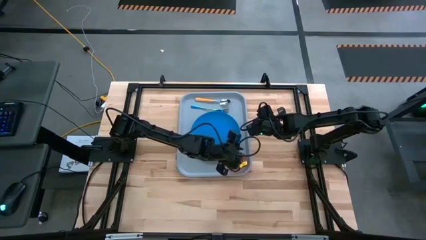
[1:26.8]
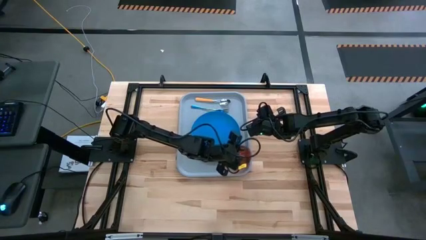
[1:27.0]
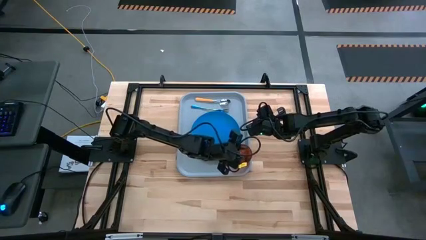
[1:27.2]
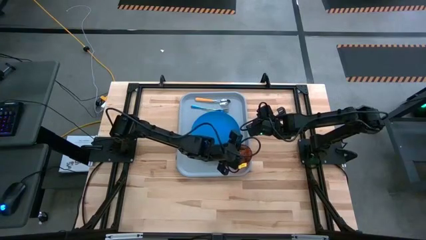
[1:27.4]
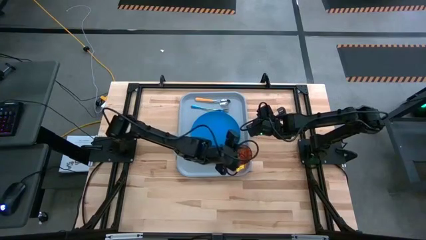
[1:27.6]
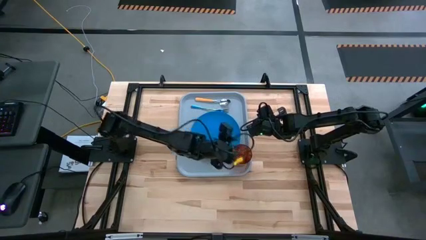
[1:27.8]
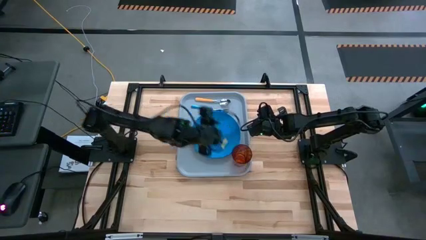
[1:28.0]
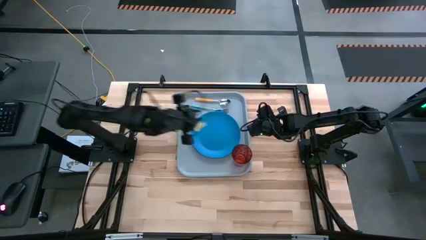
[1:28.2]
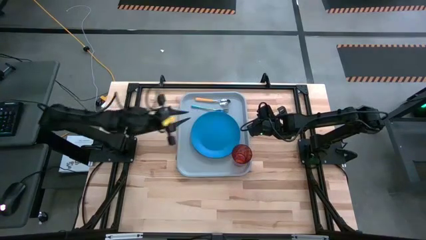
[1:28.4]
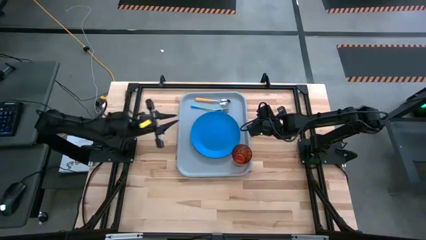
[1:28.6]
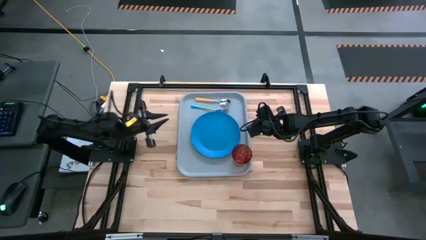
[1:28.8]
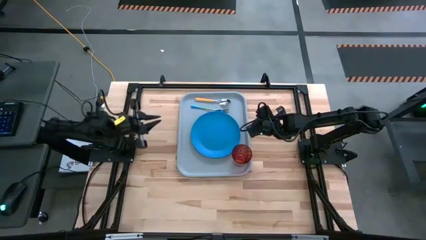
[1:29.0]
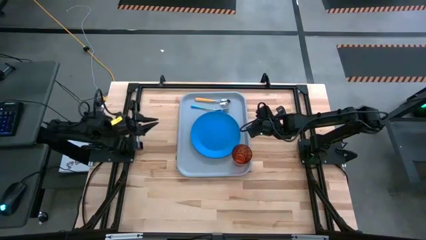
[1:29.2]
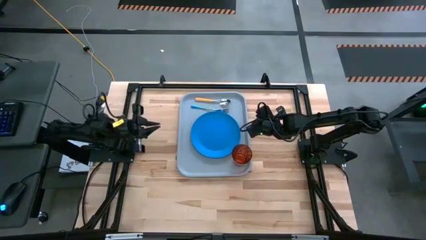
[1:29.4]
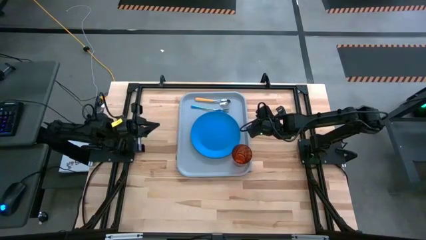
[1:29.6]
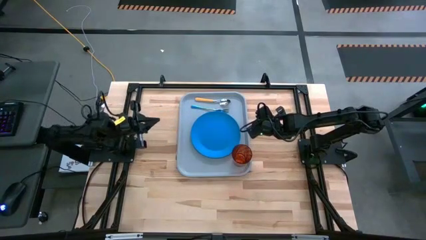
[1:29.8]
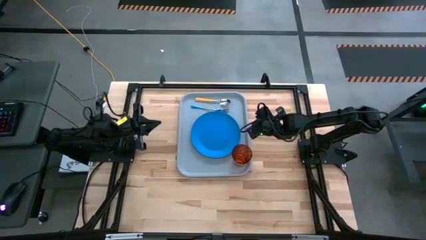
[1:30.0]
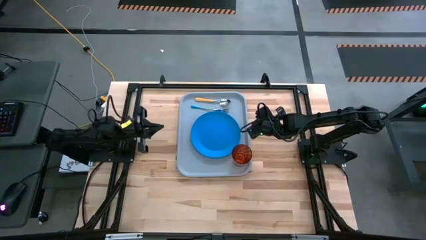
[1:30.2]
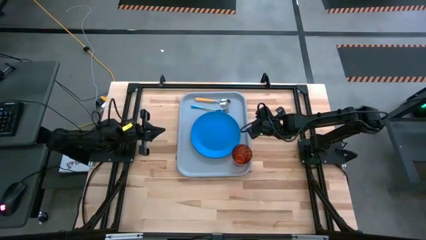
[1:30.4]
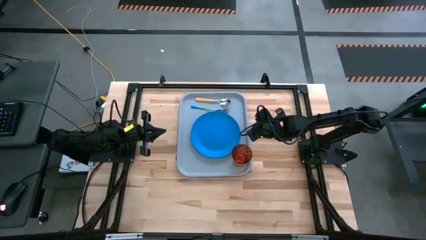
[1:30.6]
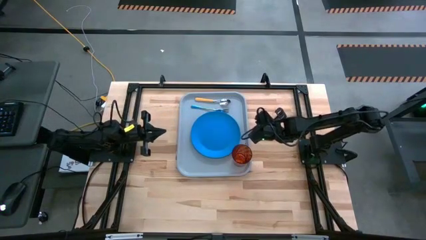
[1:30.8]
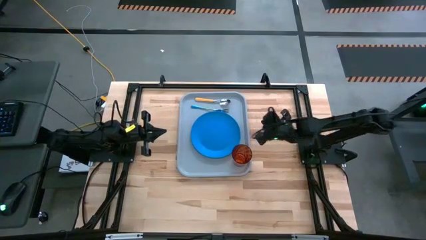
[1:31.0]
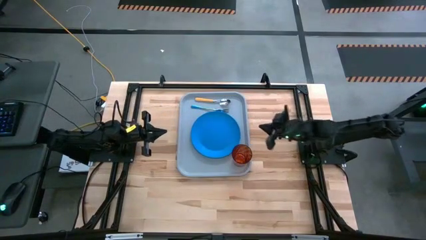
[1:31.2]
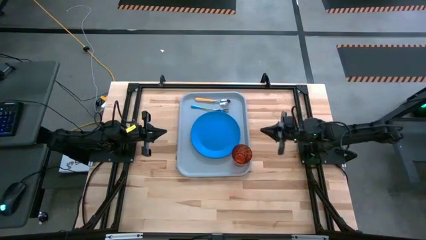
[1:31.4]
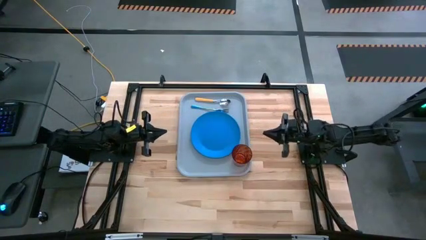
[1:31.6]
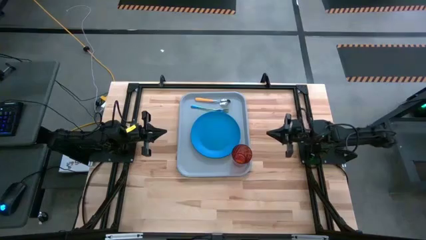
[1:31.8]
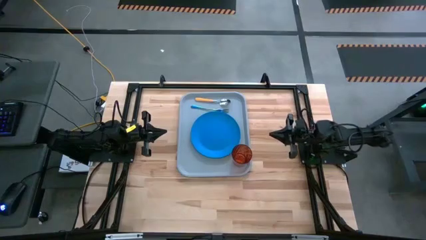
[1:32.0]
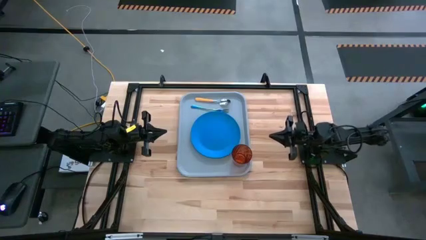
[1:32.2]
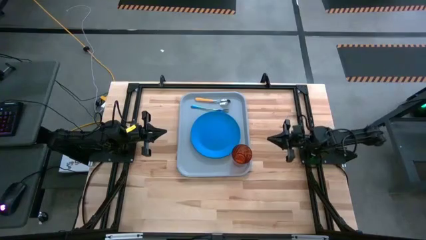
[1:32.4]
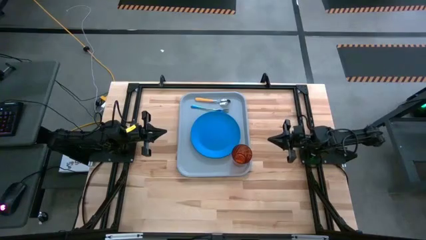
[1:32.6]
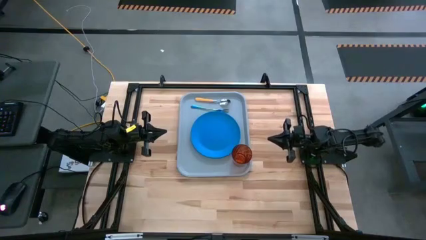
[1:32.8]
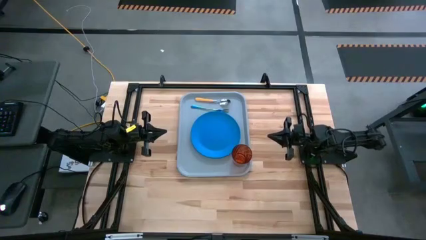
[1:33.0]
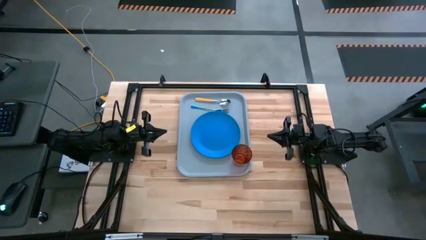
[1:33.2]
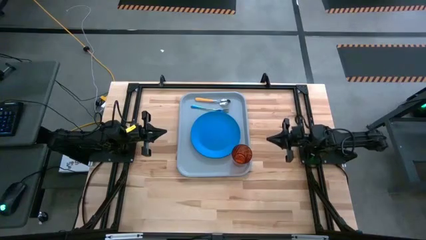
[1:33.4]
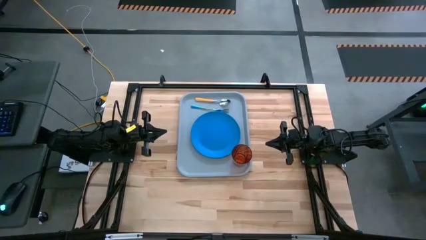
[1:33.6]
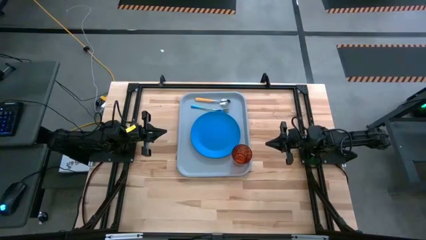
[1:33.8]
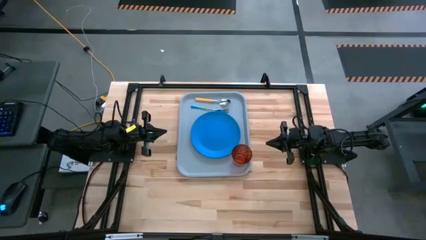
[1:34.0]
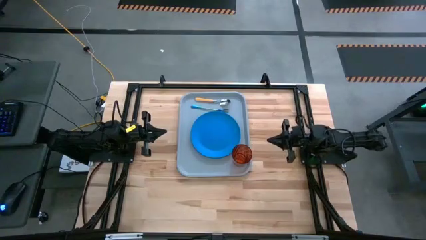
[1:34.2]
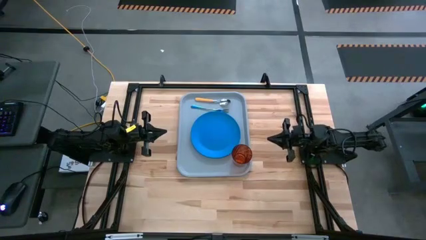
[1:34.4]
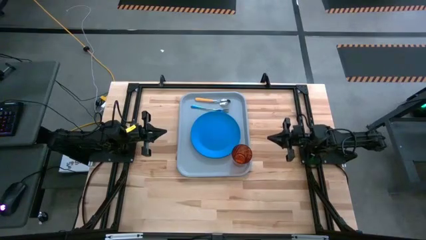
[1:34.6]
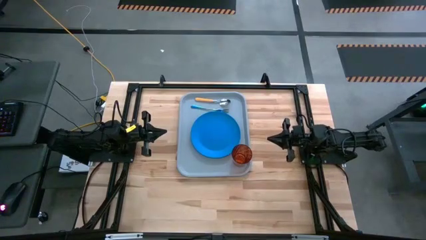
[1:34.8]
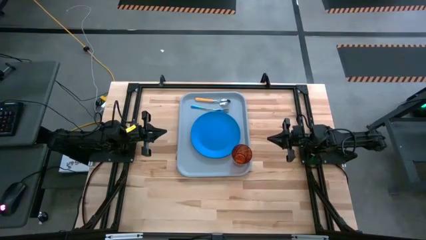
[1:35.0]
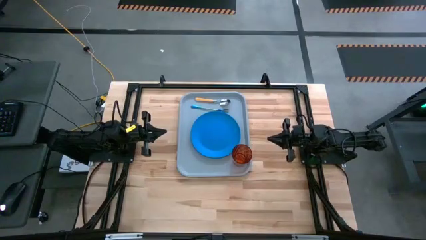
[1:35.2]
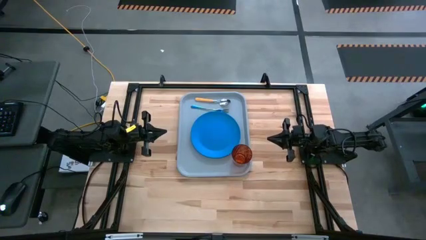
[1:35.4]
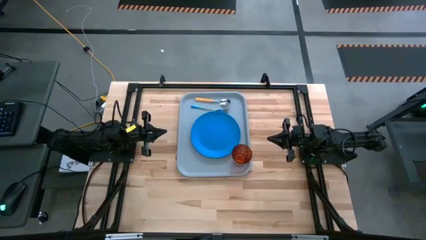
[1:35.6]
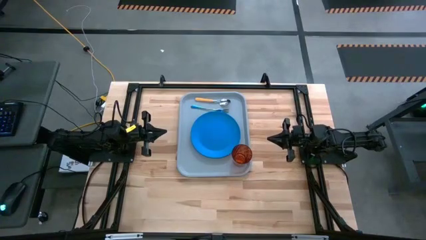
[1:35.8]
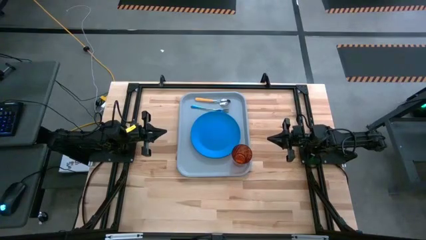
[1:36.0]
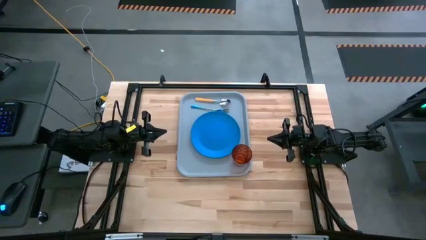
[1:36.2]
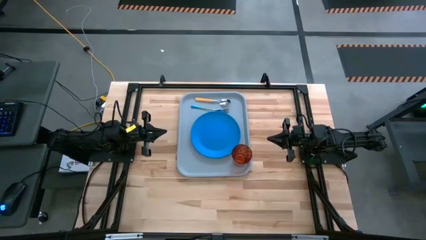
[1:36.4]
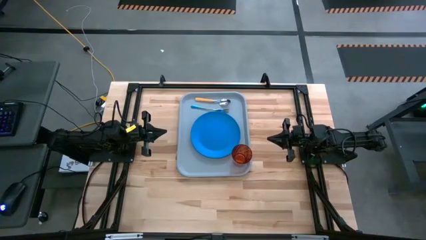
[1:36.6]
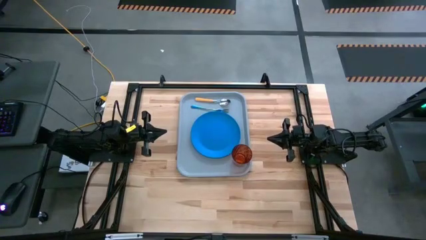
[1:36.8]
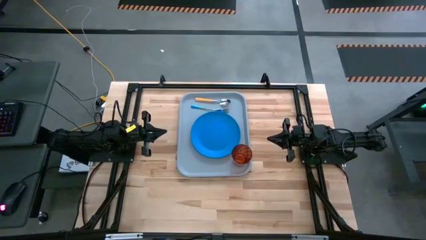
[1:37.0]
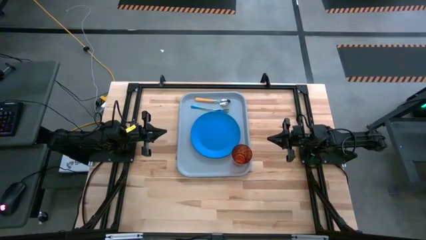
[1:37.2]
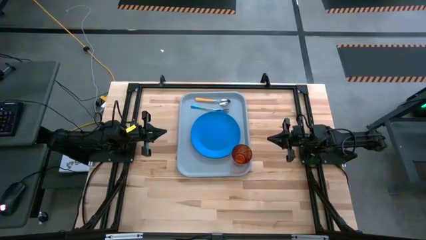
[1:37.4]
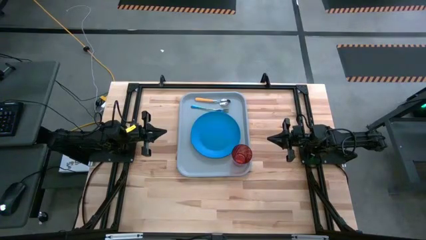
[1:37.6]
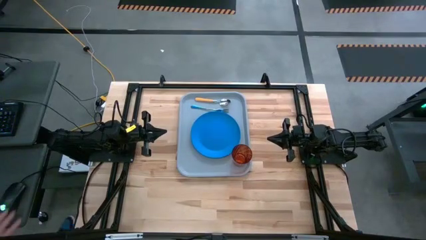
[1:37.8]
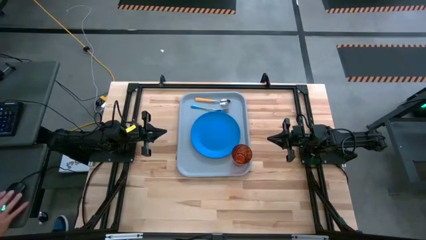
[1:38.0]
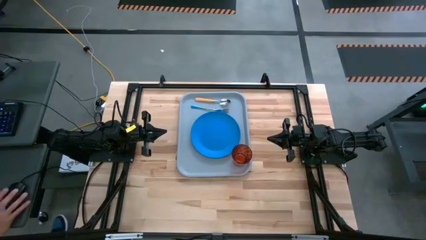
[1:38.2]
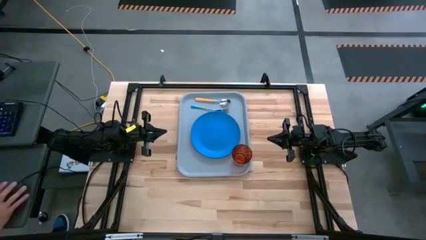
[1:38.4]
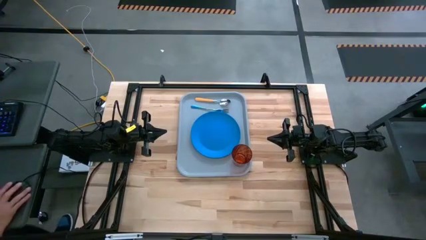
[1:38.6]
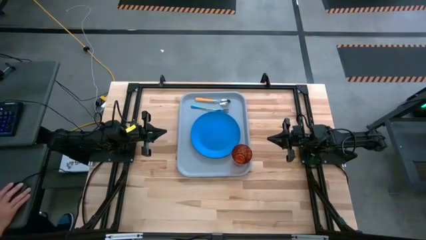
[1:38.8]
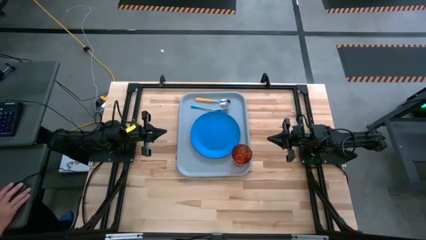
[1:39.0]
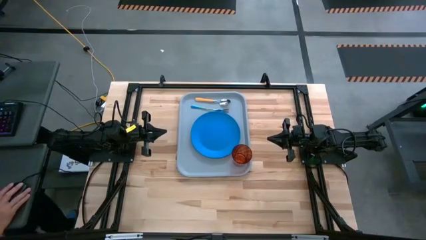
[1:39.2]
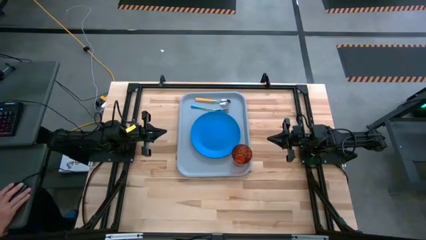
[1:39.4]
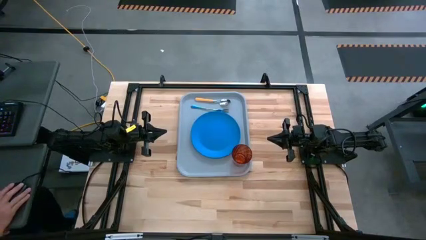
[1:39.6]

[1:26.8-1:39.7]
Task: Pick and place plate/cup/fork/spoon on tray
Return to Home Position

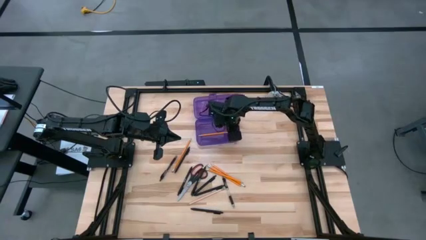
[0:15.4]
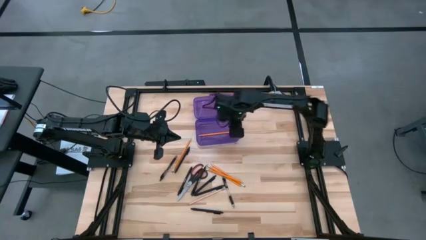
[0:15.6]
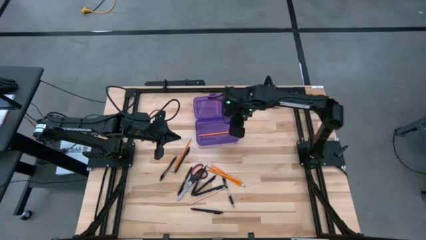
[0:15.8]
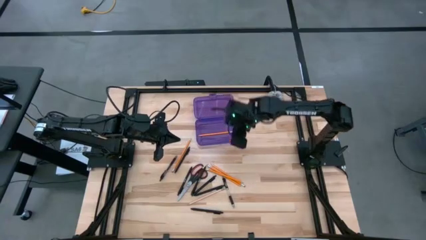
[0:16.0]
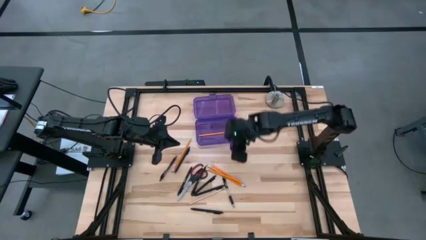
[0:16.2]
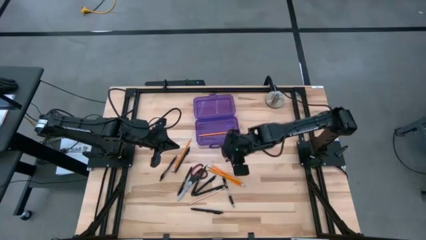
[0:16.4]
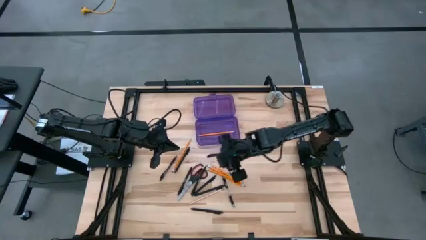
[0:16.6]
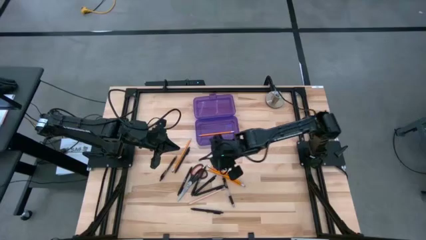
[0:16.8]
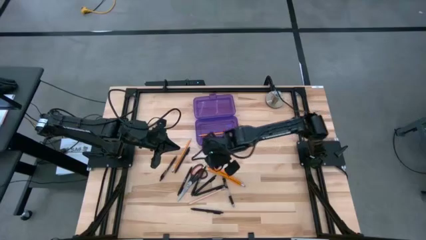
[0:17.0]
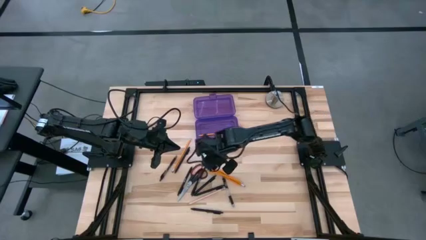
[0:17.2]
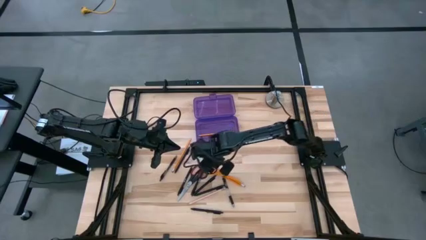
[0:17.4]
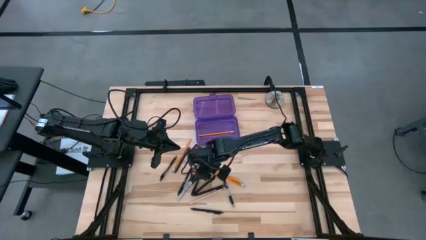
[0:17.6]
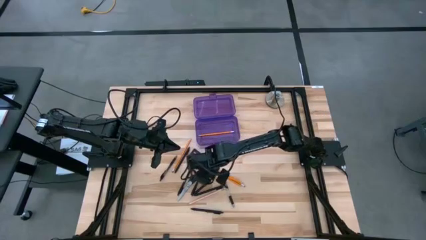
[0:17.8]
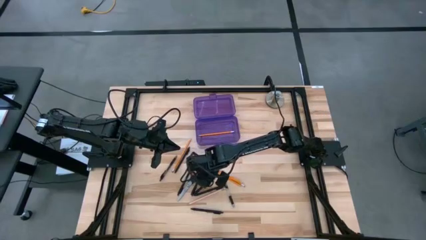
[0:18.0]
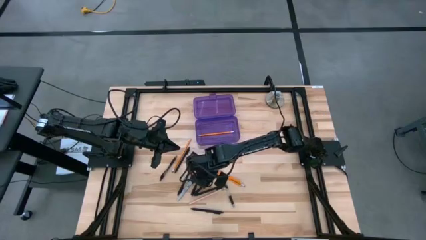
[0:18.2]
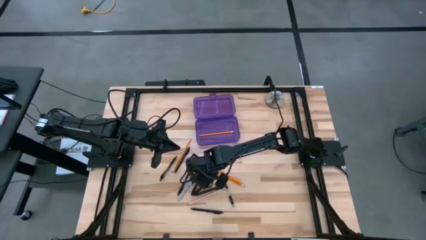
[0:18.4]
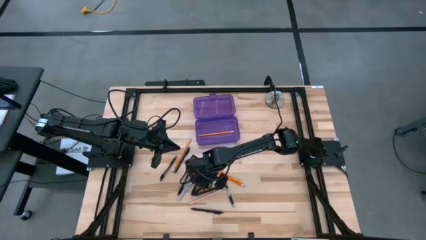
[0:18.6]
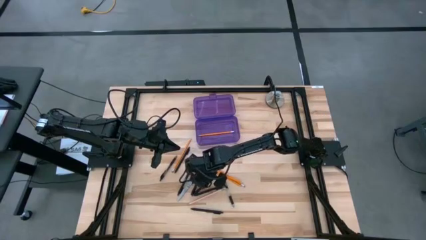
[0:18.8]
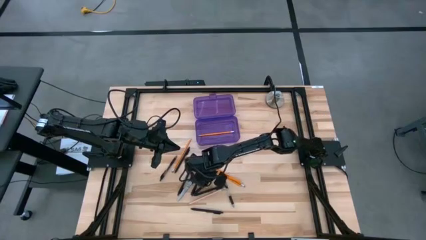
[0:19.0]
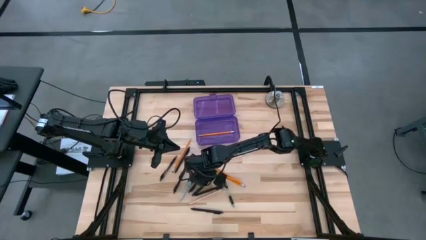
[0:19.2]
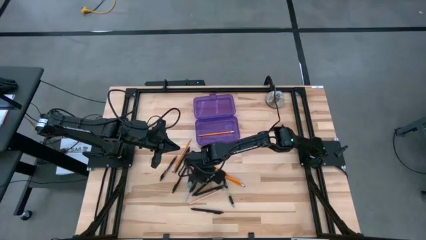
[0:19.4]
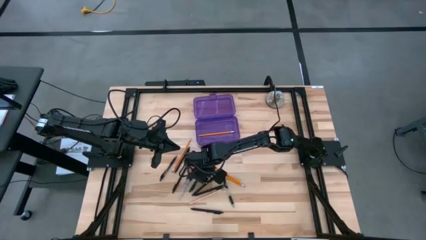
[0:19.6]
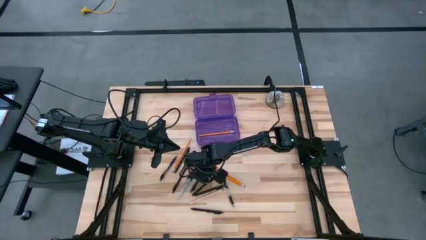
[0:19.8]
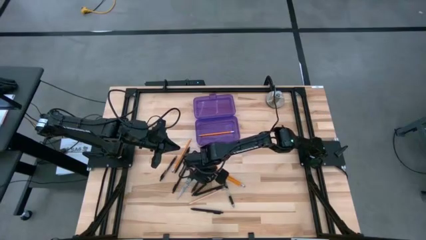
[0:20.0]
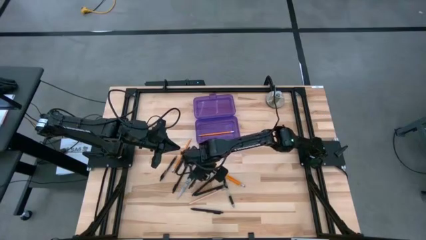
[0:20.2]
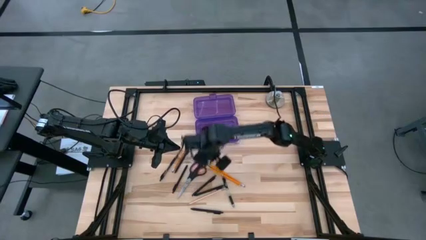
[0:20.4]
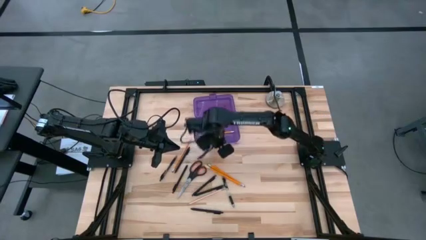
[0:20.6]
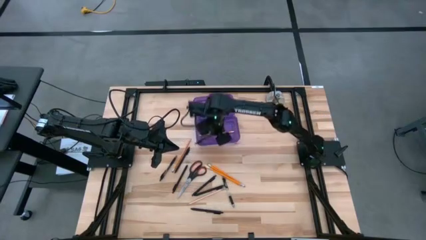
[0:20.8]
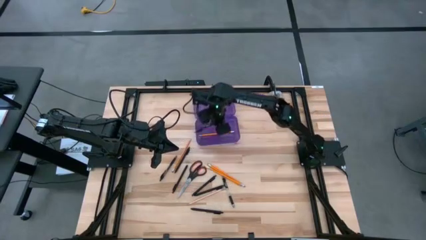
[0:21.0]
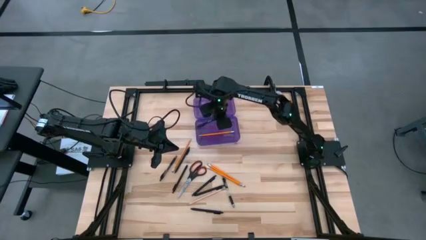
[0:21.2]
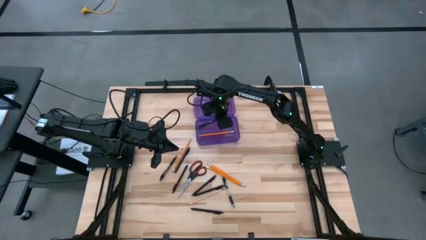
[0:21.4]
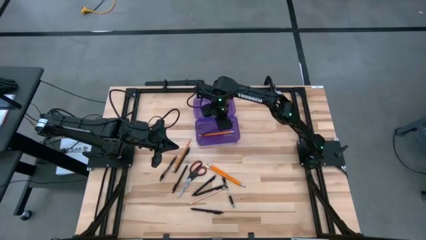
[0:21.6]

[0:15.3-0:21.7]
Task: Pick & place school supplies into a supply box
Put the black pen into the purple supply box
